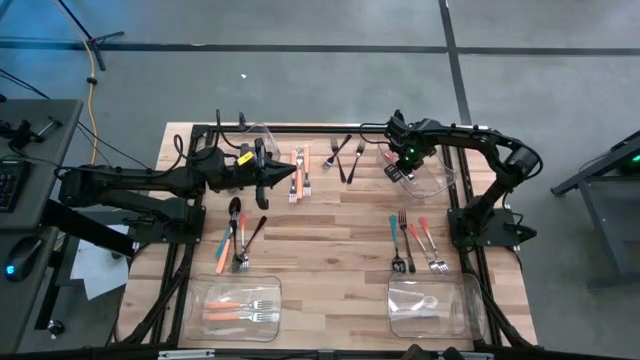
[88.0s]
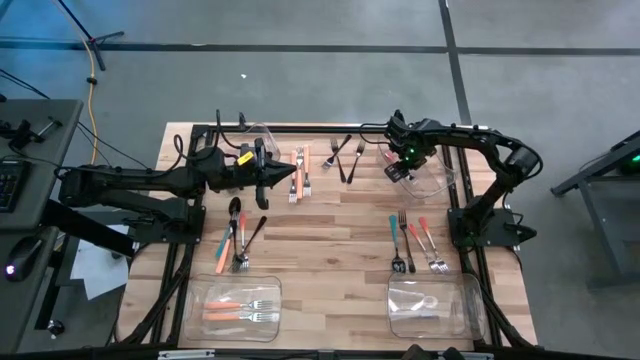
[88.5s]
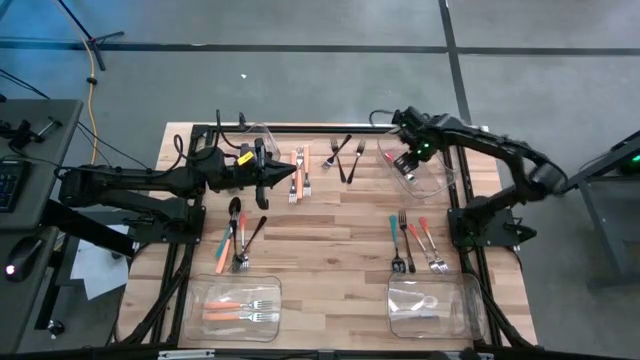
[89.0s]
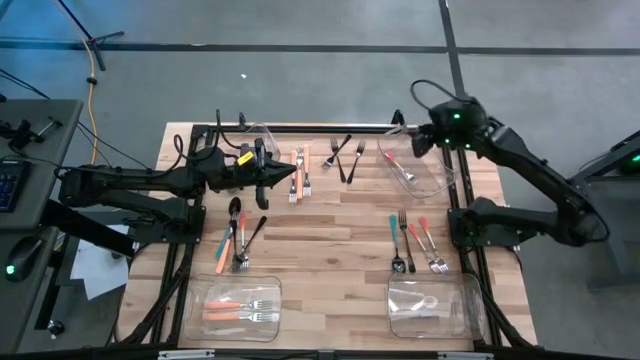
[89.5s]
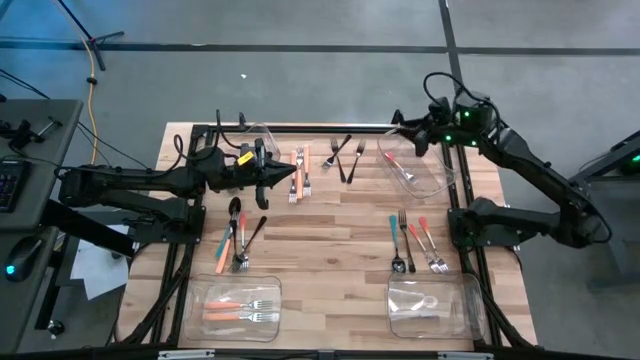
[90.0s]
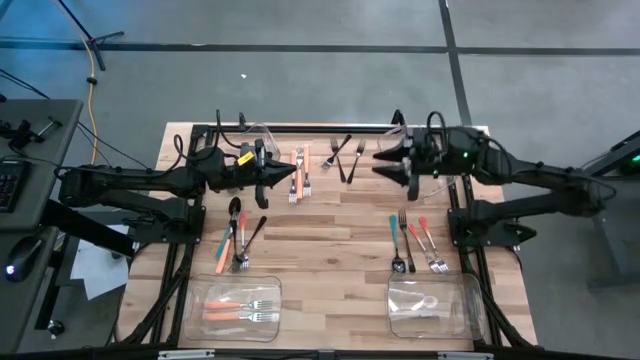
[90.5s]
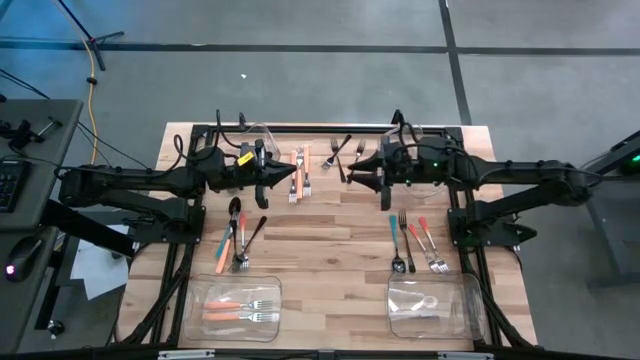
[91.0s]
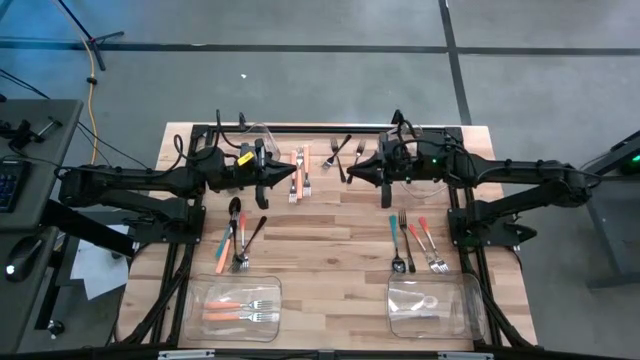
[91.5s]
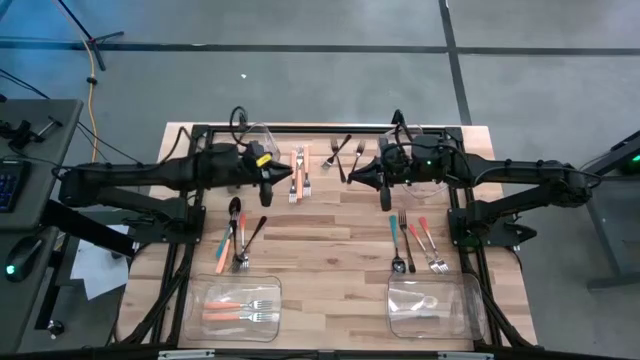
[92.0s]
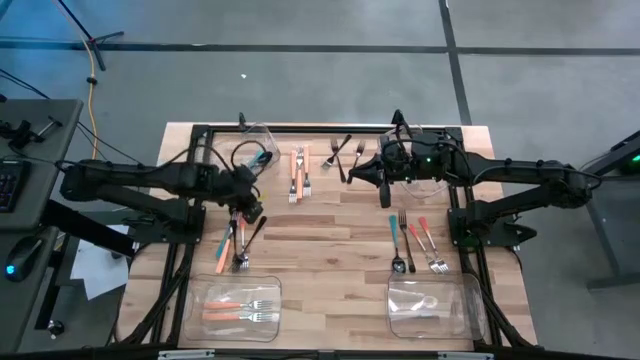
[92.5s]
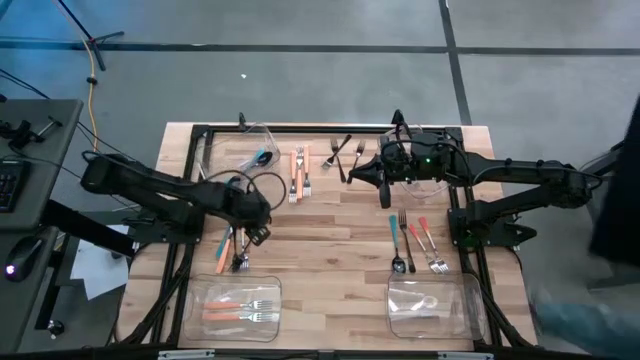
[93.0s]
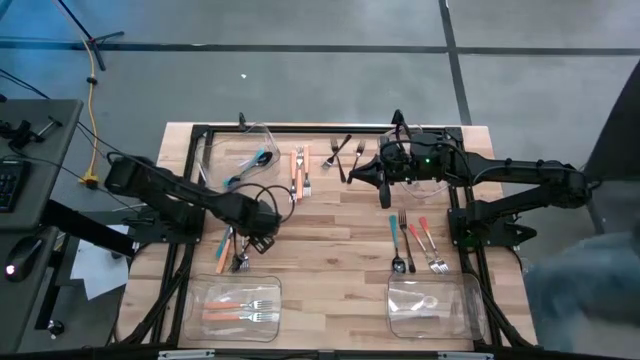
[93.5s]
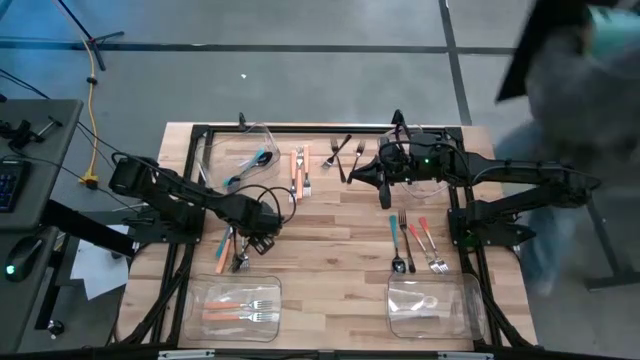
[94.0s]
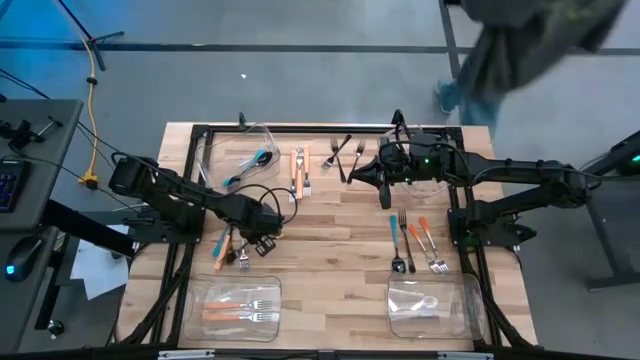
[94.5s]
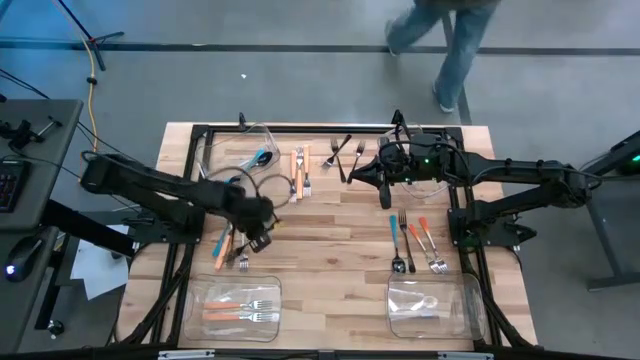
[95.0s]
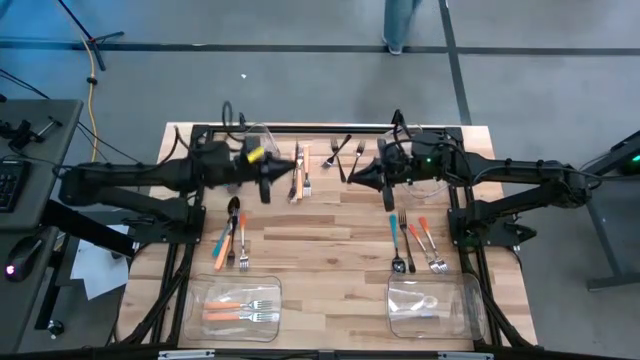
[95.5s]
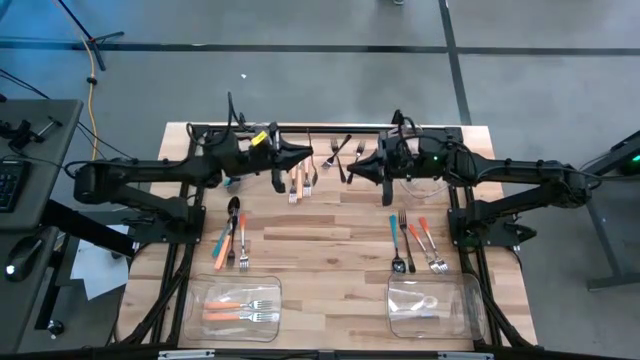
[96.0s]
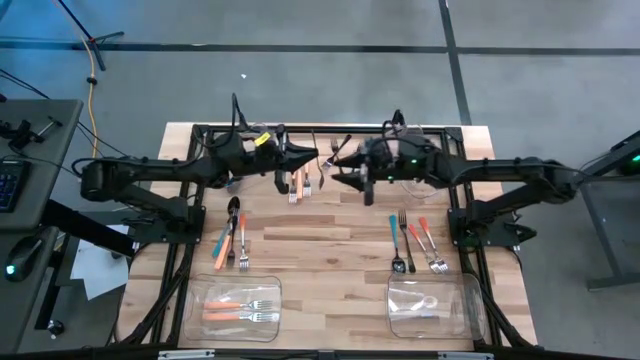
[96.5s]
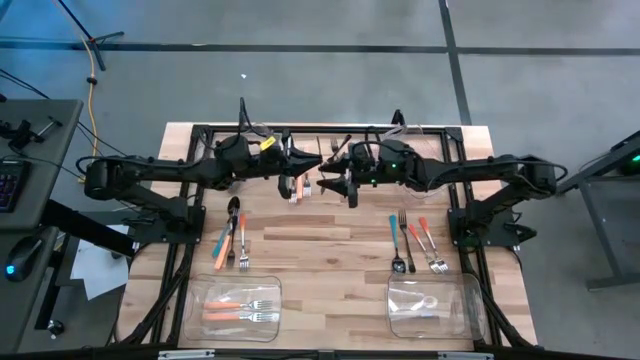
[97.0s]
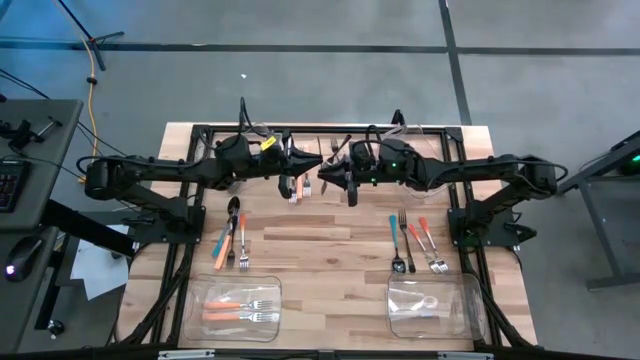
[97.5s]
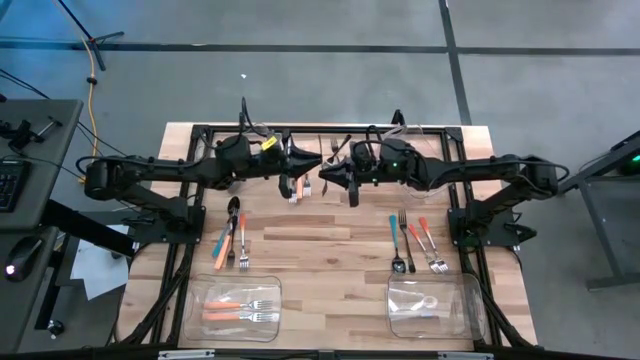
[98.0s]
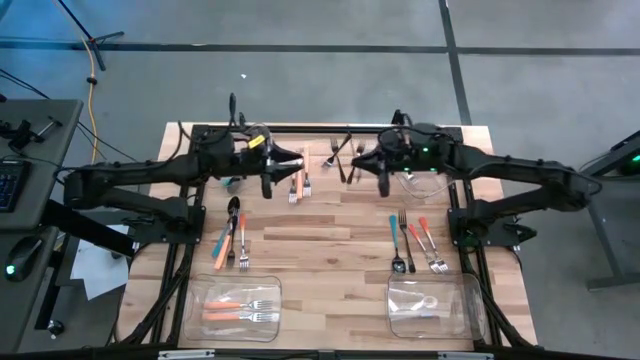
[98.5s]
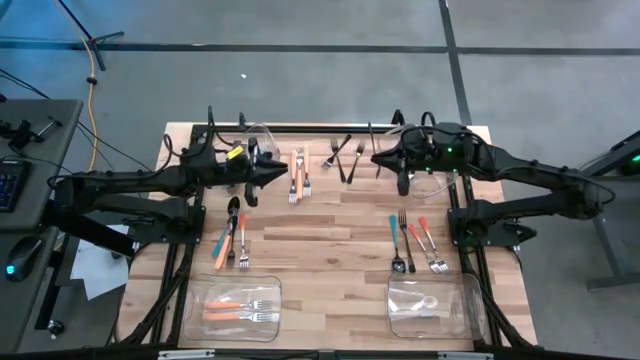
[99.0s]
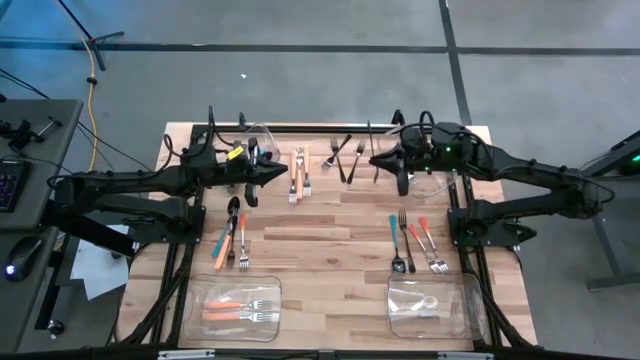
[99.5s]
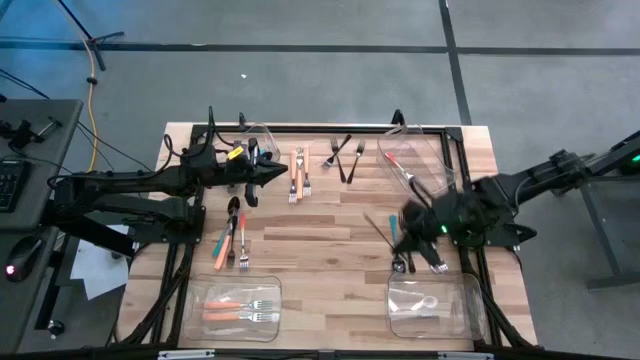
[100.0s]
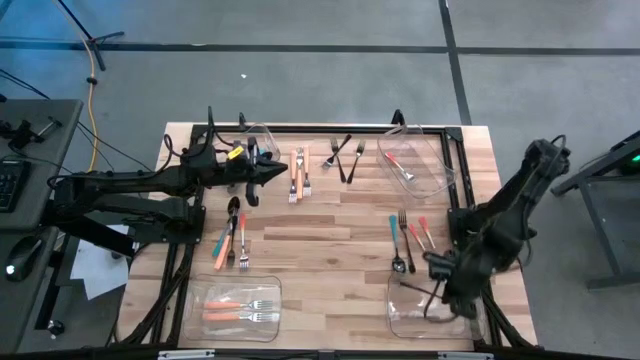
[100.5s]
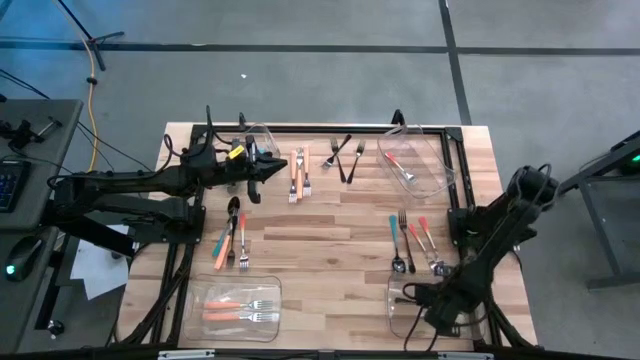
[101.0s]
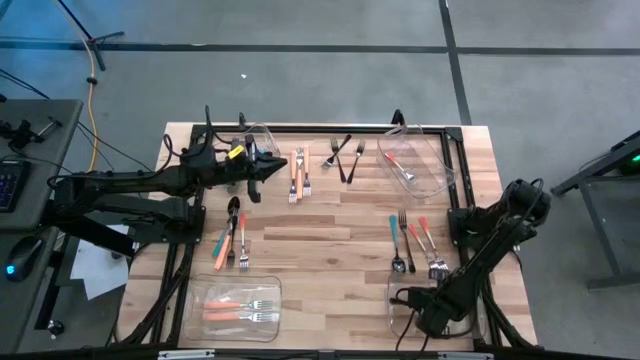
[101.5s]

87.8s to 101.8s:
Task: Sort silverware by color (type)
Put the black fork into the bottom right transparent bin

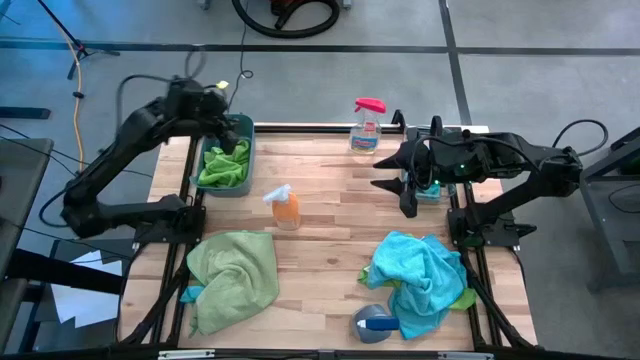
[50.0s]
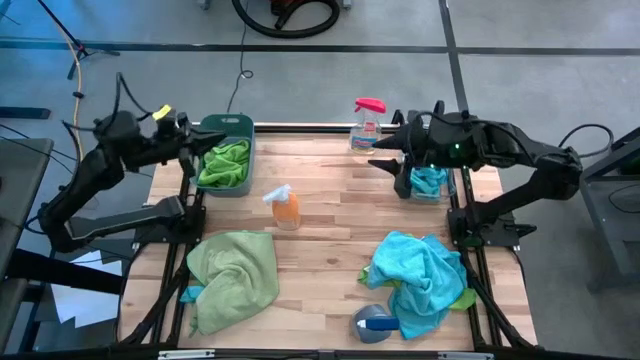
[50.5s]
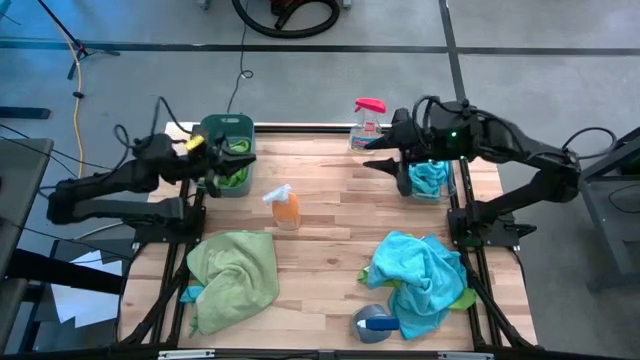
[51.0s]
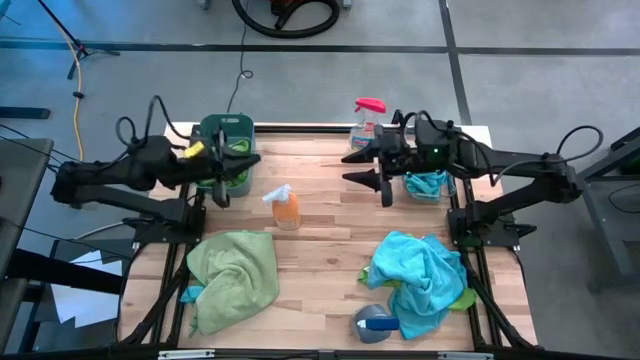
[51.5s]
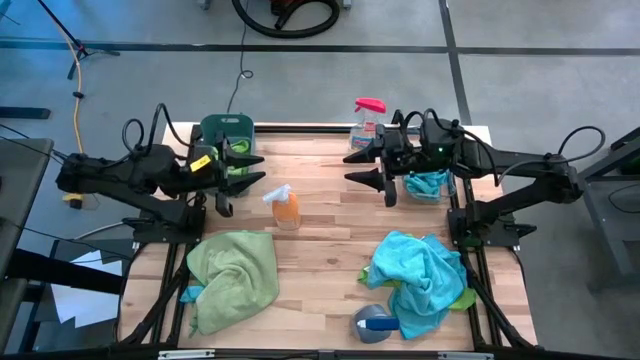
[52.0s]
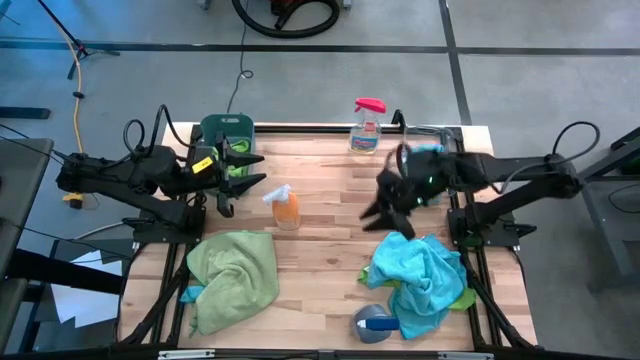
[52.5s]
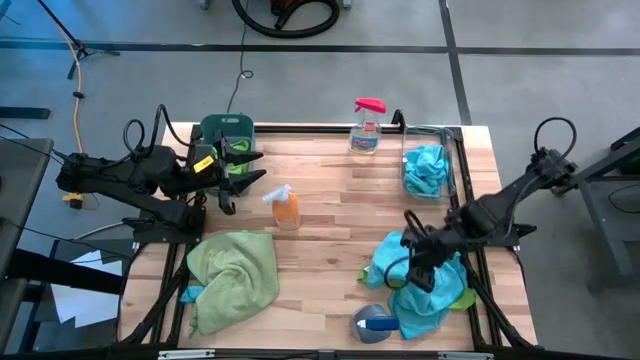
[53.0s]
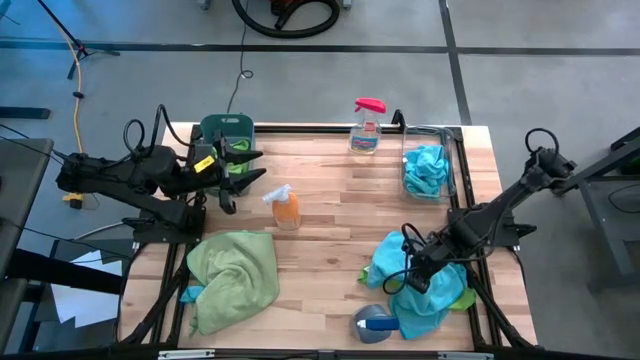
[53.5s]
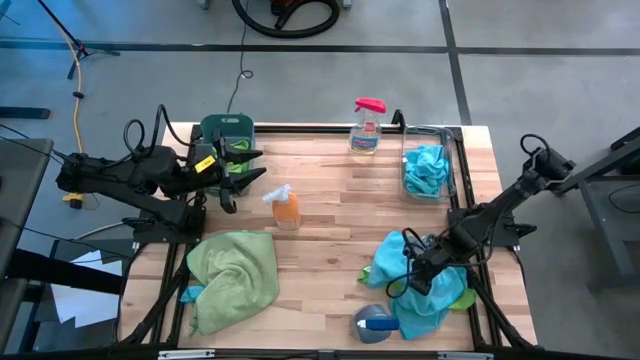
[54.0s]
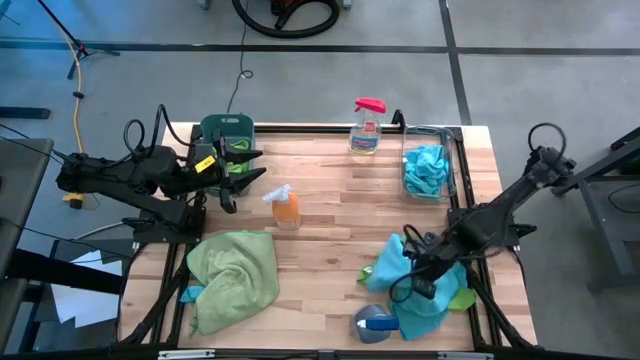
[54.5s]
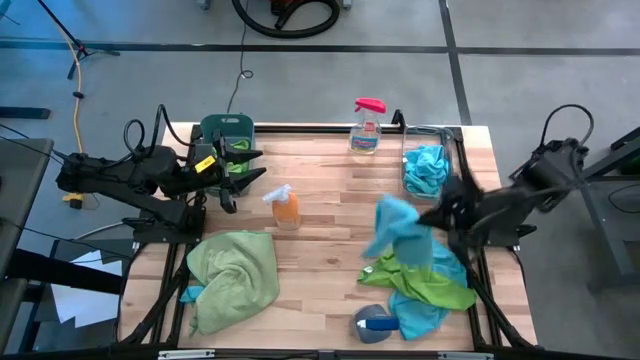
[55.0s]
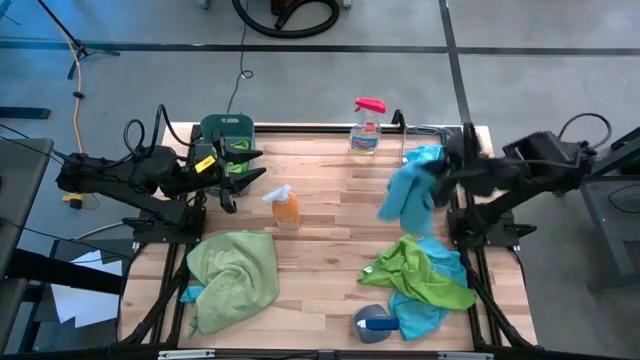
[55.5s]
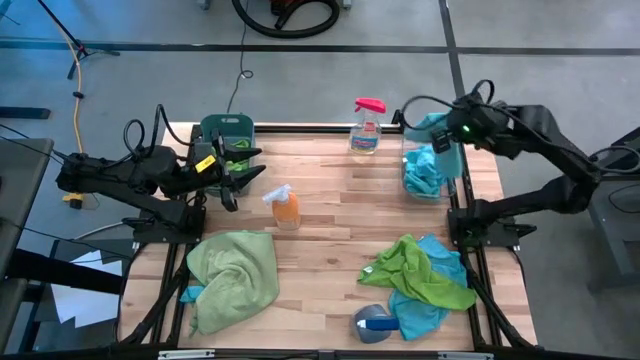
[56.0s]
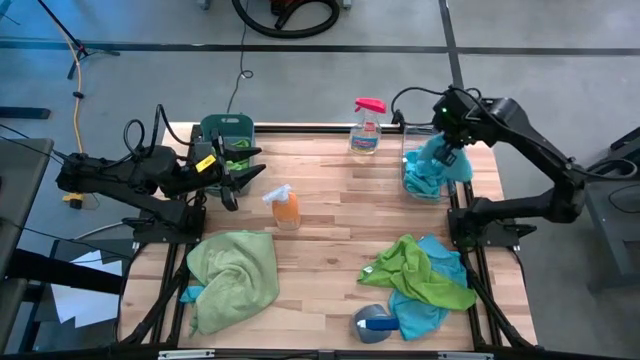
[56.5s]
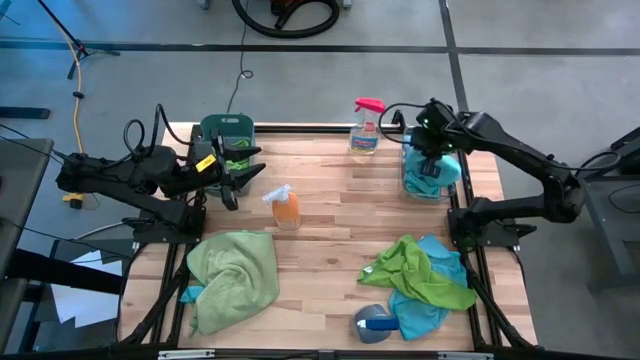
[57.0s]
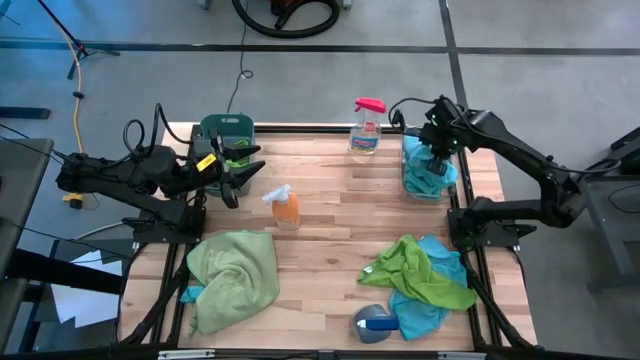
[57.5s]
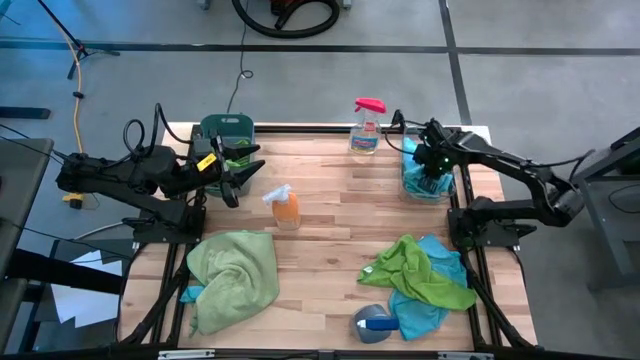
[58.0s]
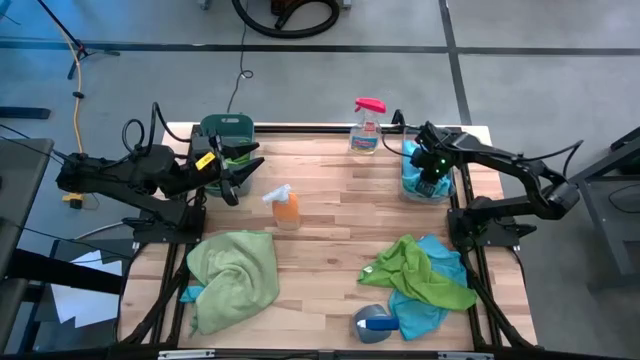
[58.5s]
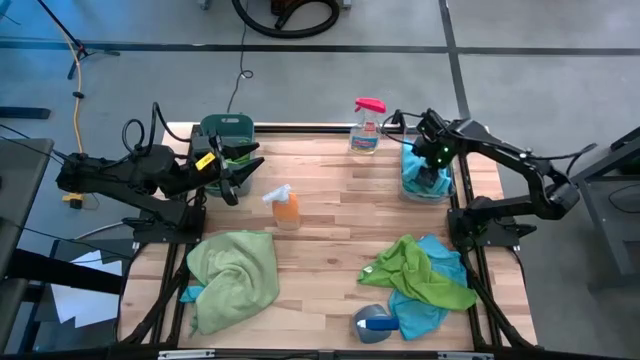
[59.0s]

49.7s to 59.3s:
Task: Sort microfiber towel by color & place in baskets
Put the blue microfiber towel into the transparent bin
